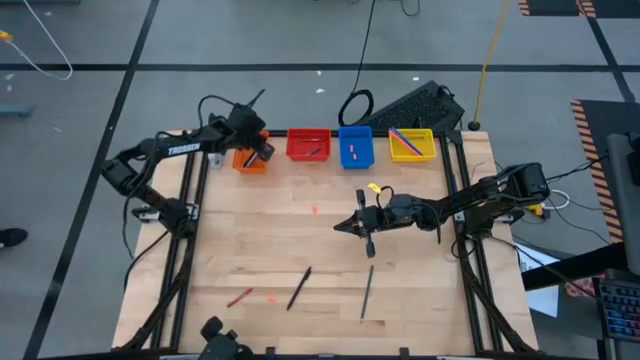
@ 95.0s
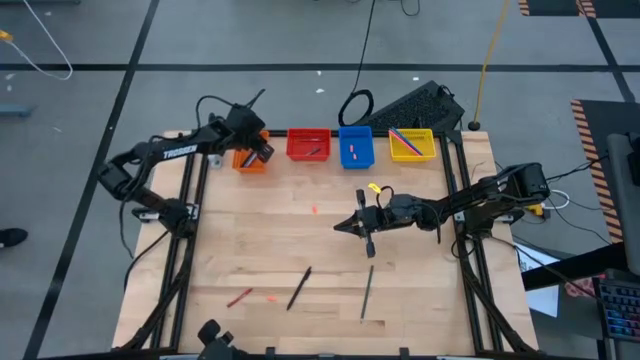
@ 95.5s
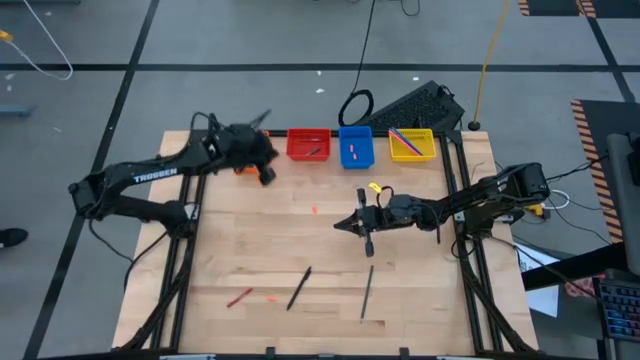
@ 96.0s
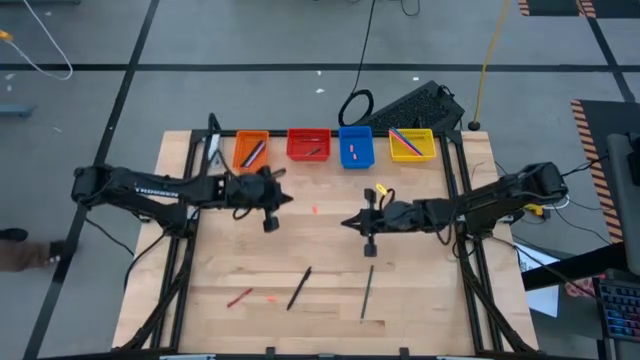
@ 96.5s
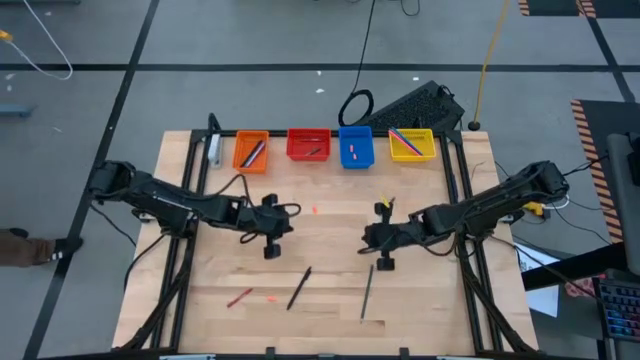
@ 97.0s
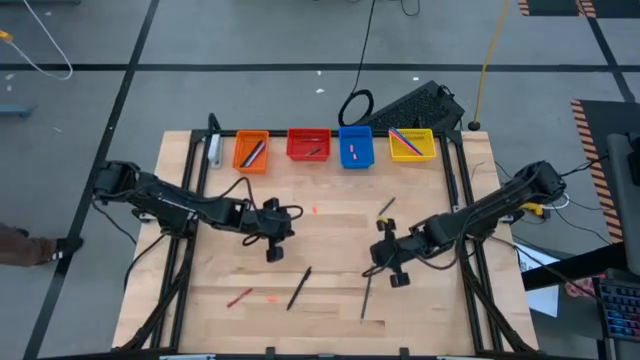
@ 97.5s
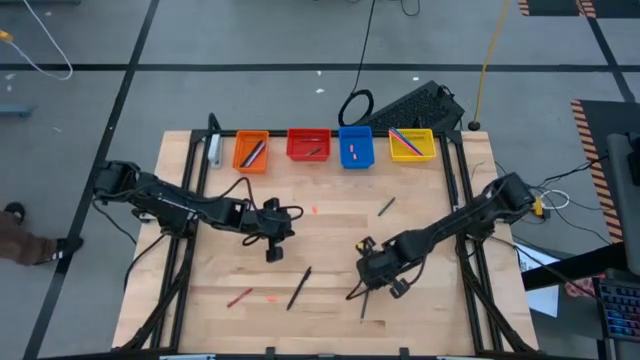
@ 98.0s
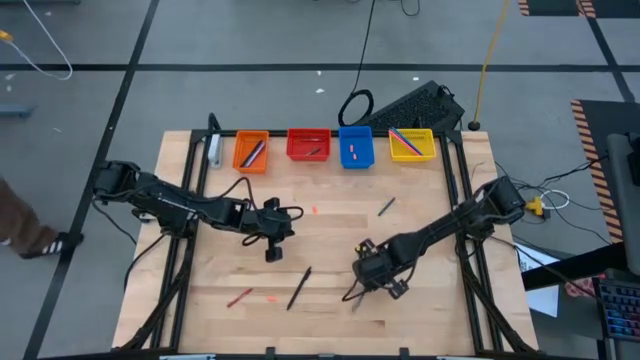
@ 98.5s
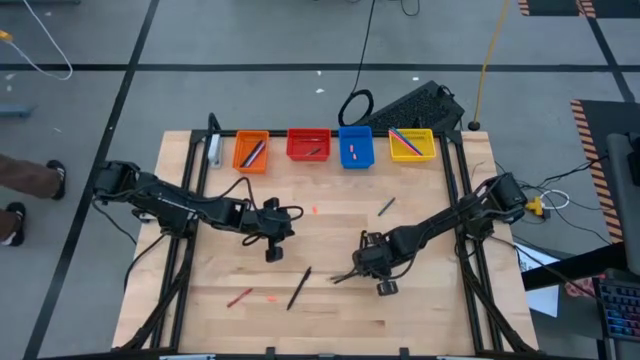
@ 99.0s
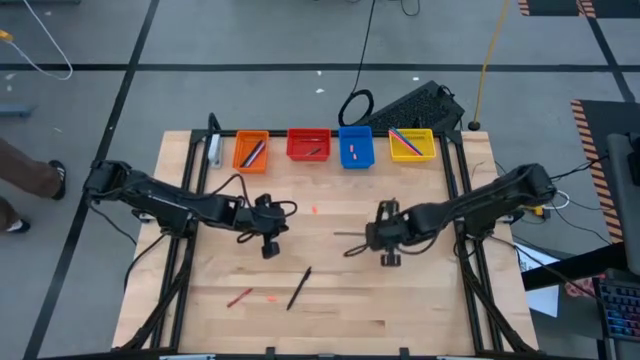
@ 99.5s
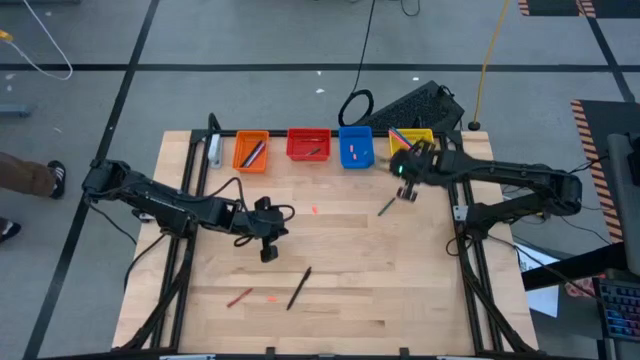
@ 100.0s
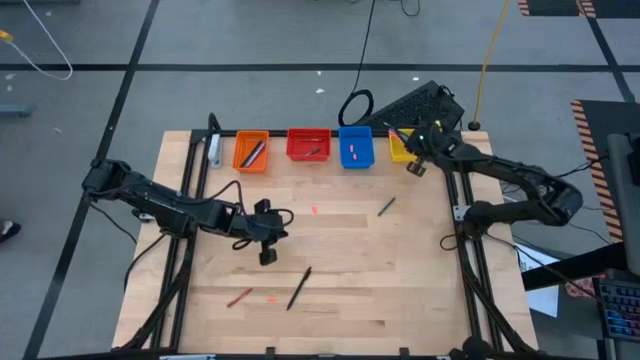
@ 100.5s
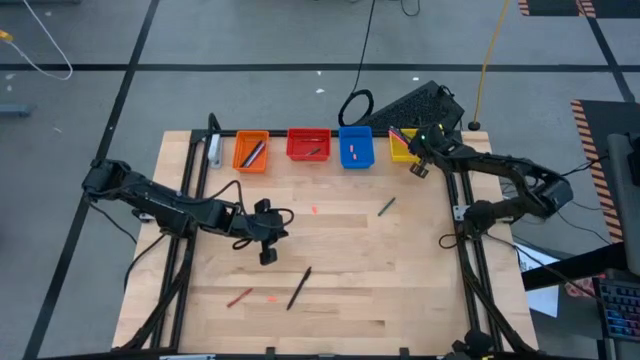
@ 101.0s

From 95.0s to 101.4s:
Task: Sort crayons/erasers/pens/pencils in bins
Put the green pencil into the yellow basket

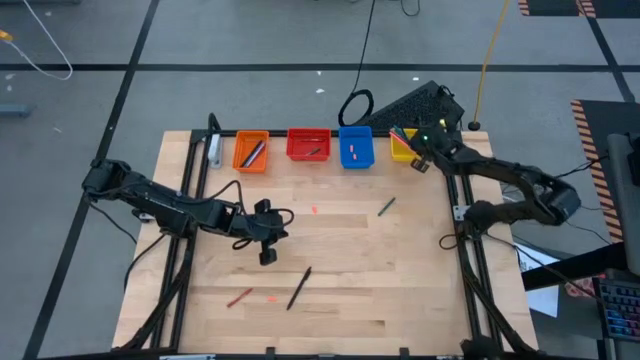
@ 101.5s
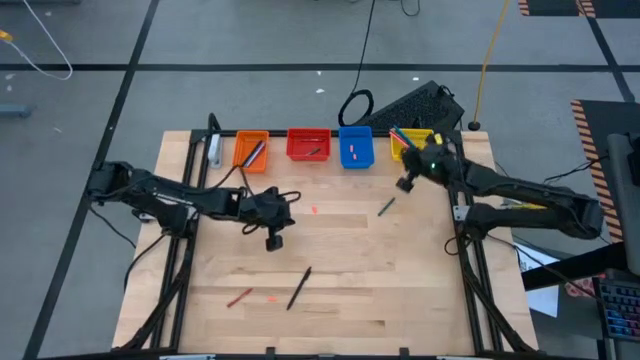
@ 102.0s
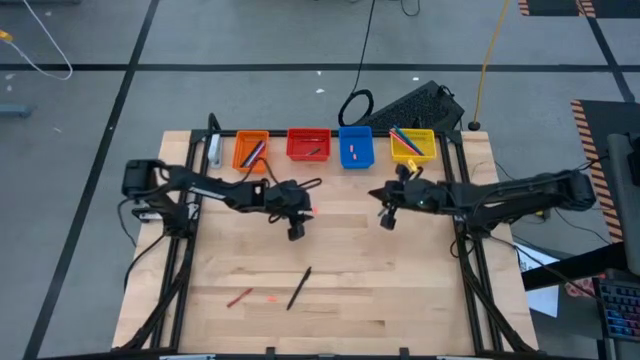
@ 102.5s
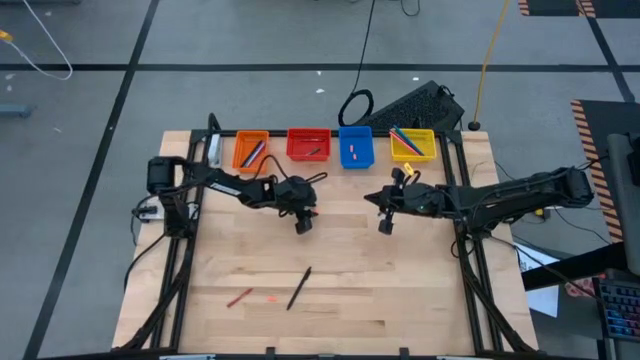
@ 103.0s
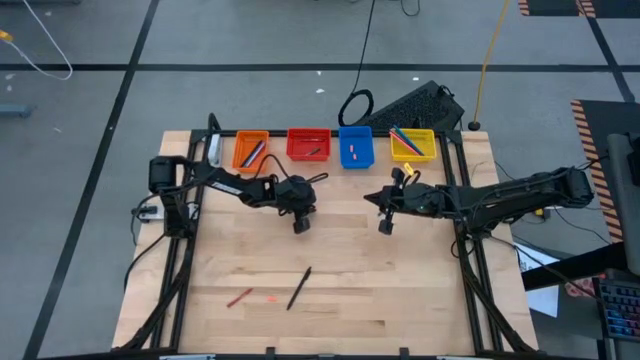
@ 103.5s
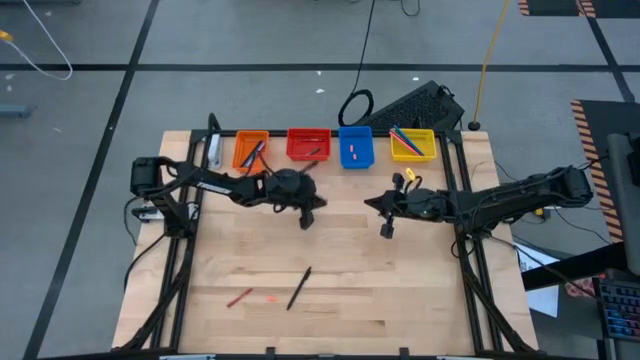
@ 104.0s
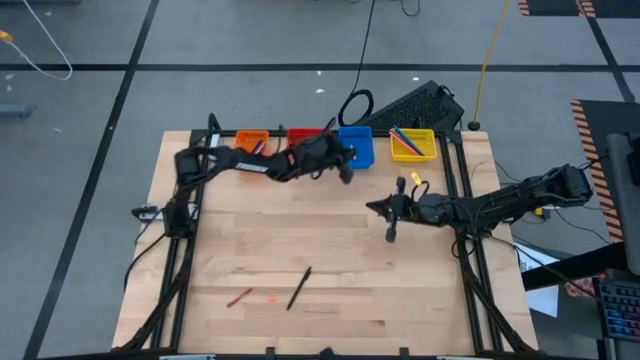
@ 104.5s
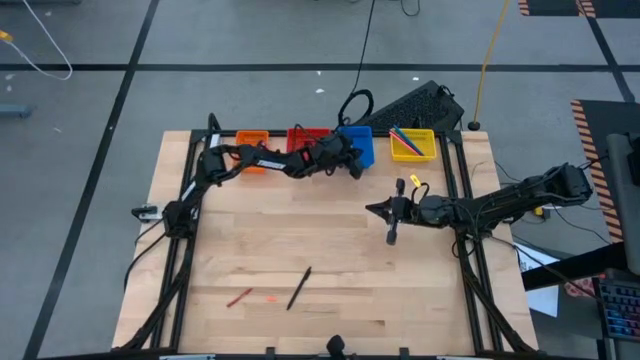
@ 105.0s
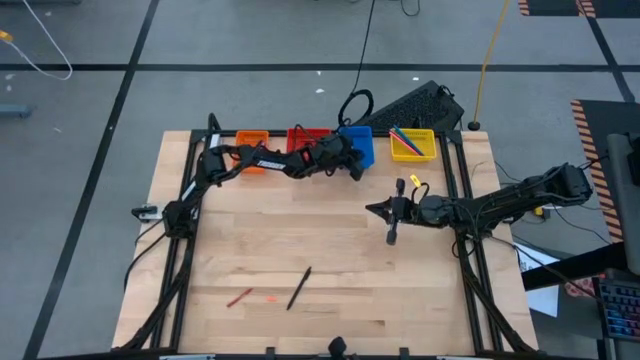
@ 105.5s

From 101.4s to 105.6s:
Put the top orange pencil eraser into the blue basket

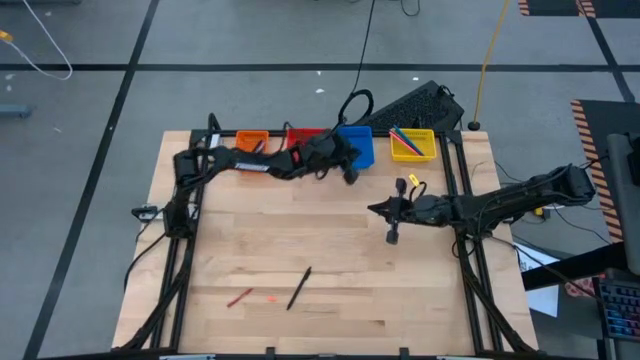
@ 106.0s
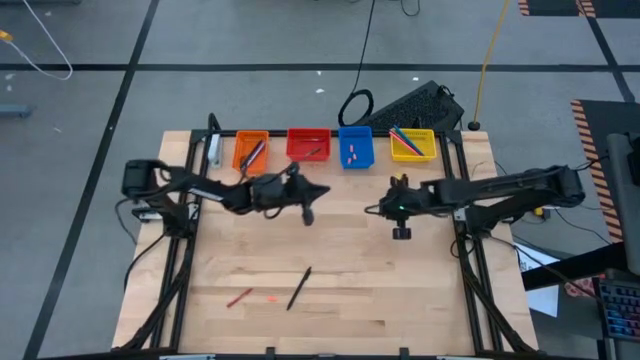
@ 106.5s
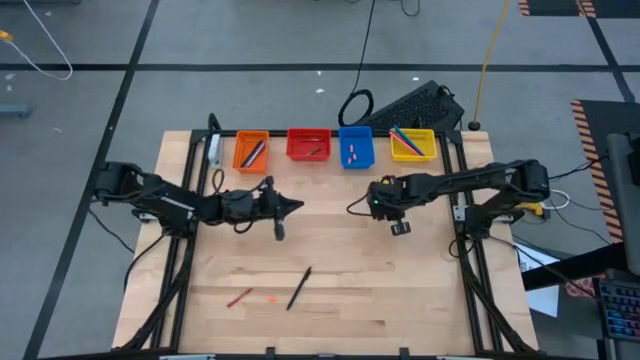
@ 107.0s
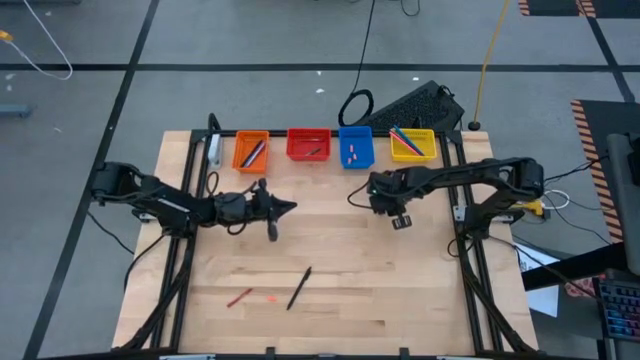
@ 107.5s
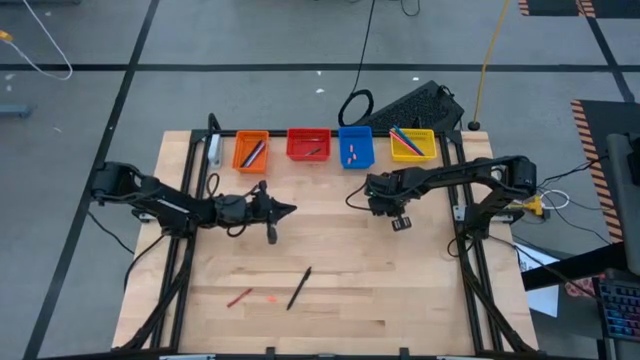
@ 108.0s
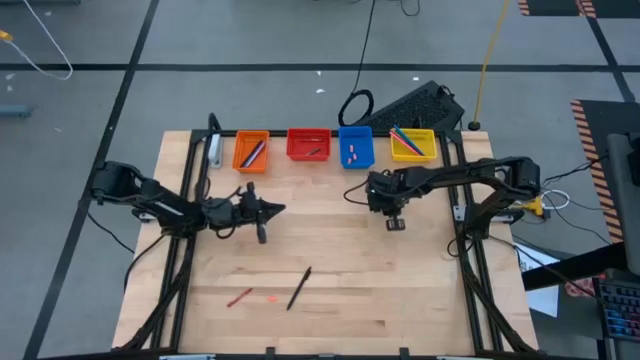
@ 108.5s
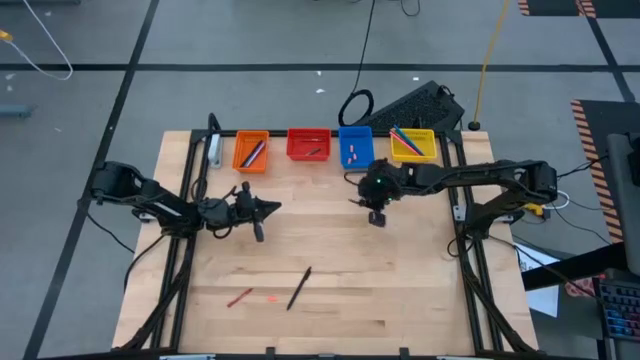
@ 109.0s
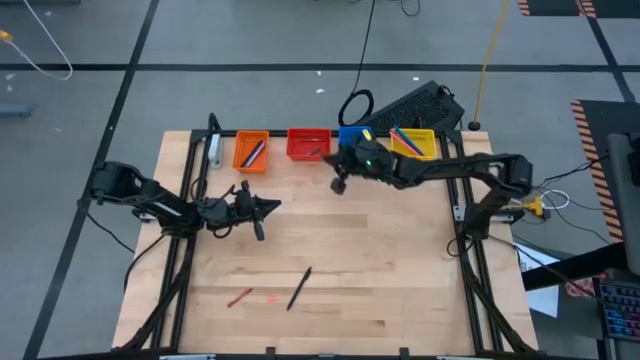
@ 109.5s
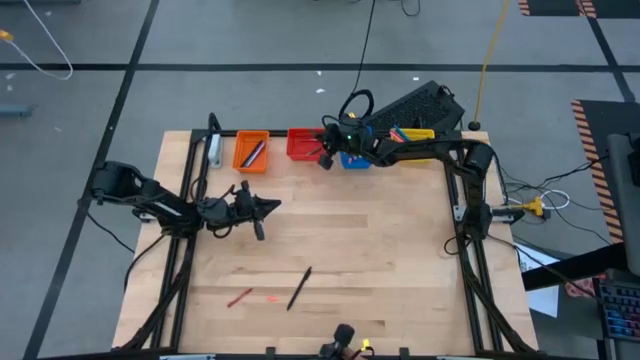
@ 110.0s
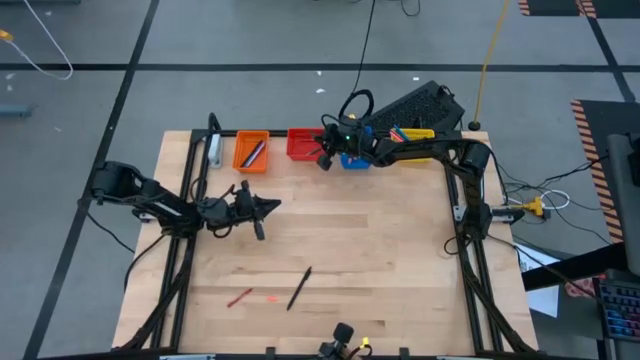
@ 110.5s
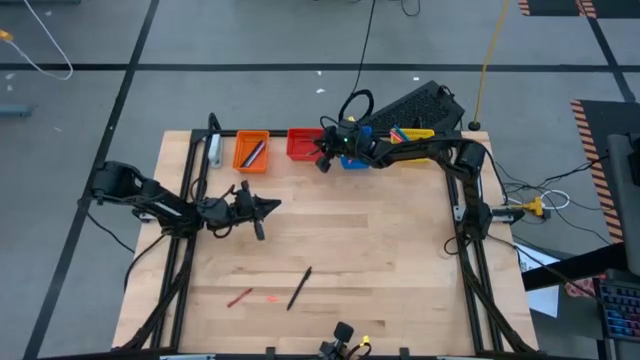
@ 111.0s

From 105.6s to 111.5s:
Put the green crayon into the red basket

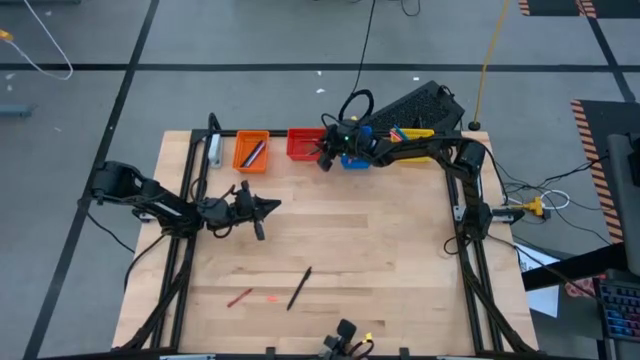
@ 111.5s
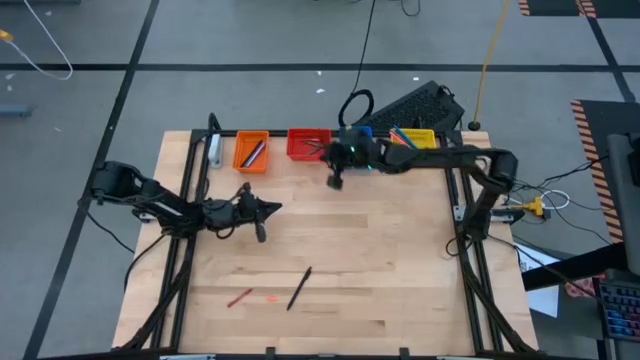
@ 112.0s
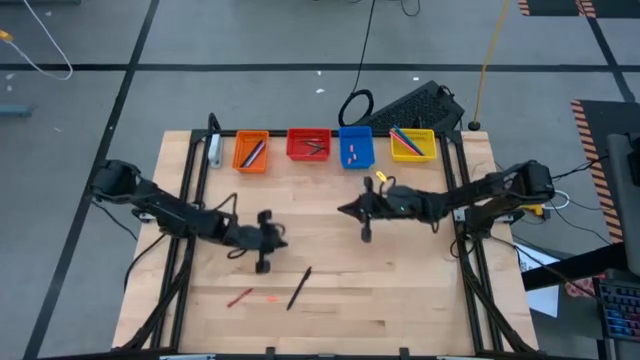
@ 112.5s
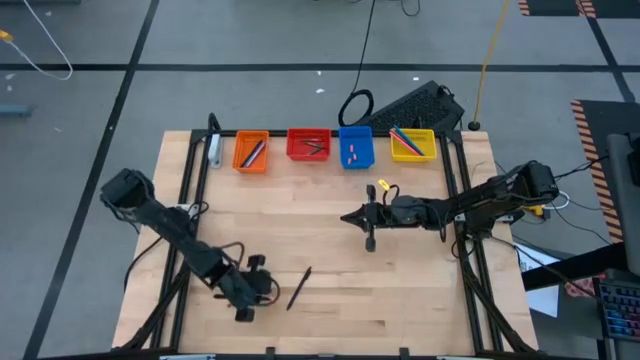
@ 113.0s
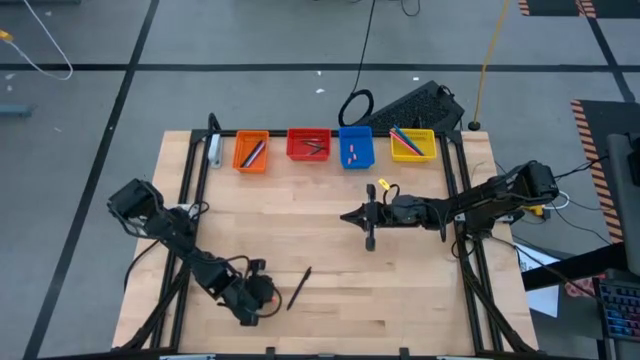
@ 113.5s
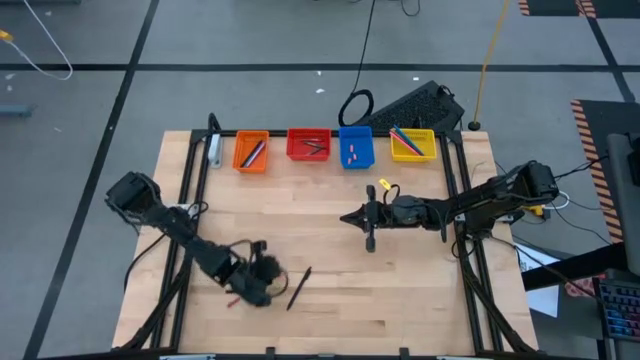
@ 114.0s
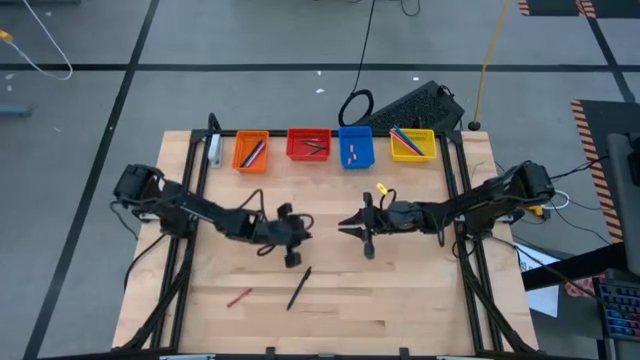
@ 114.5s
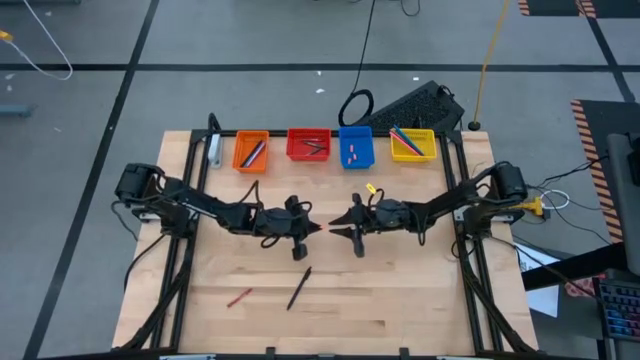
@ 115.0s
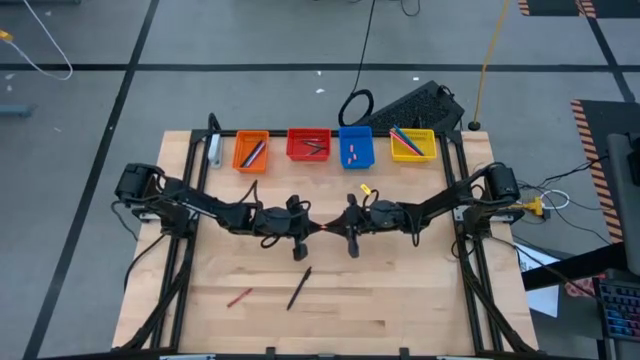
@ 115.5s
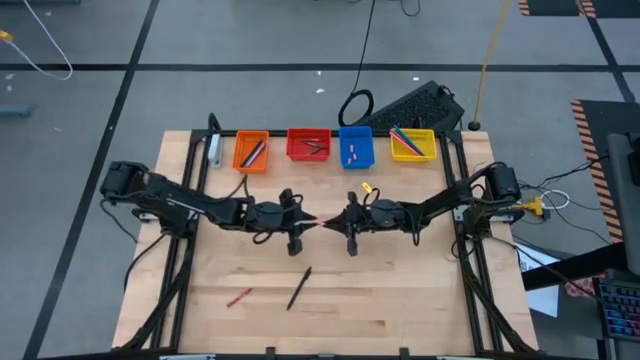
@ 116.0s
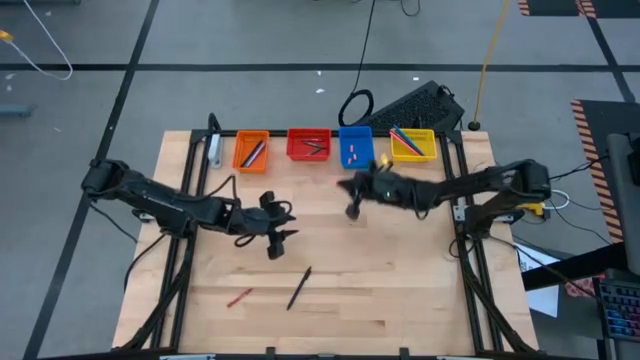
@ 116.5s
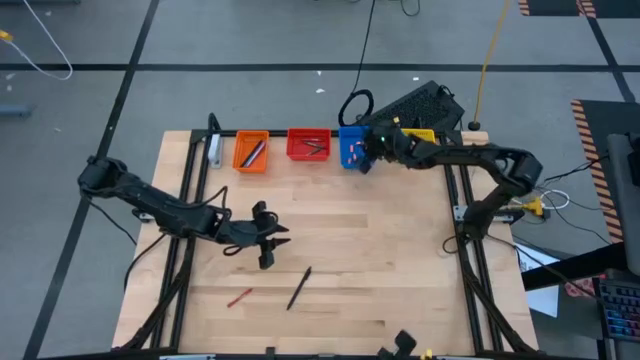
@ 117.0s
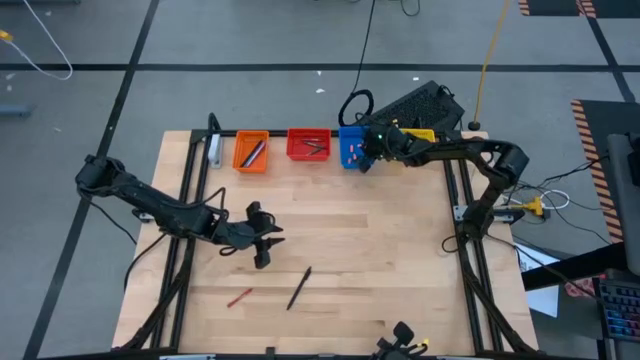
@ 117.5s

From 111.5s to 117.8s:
Put the orange pencil eraser into the blue basket
